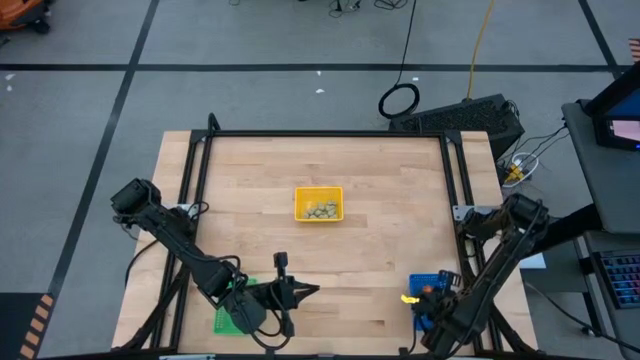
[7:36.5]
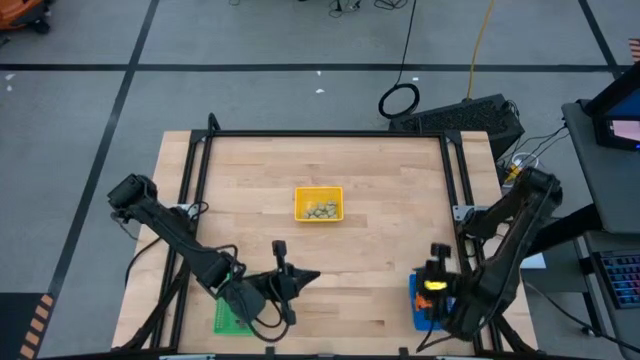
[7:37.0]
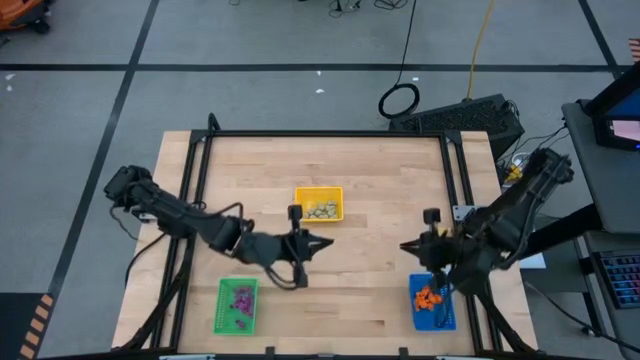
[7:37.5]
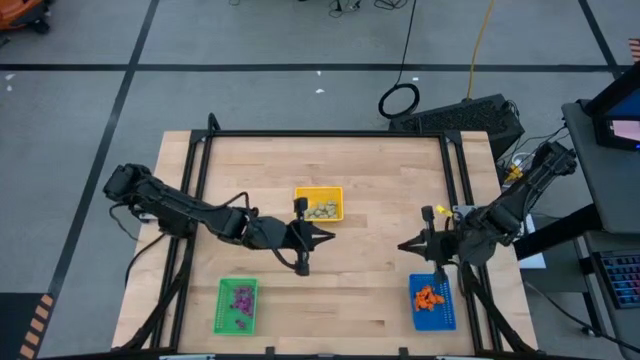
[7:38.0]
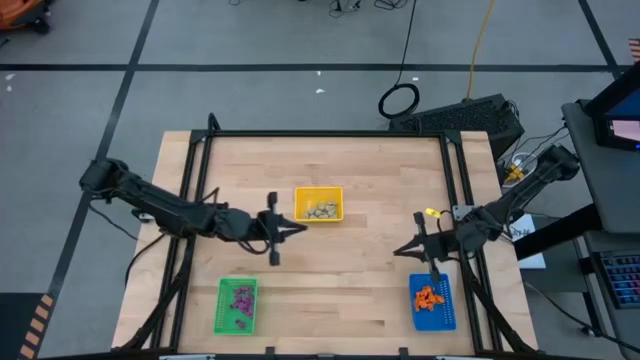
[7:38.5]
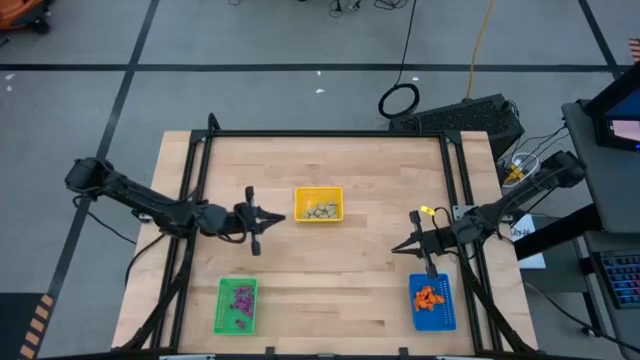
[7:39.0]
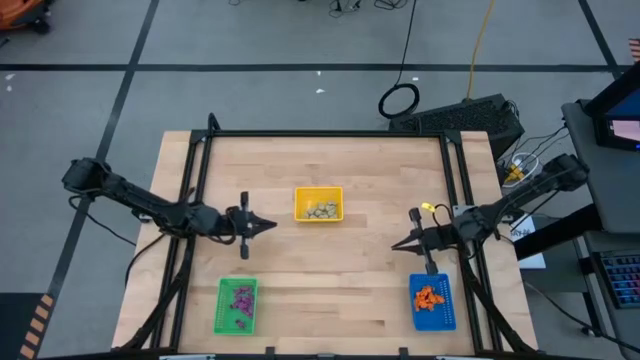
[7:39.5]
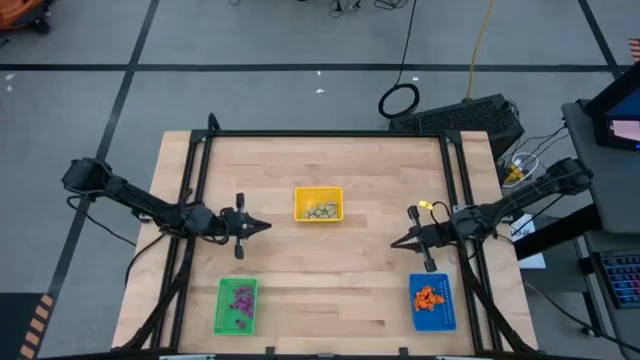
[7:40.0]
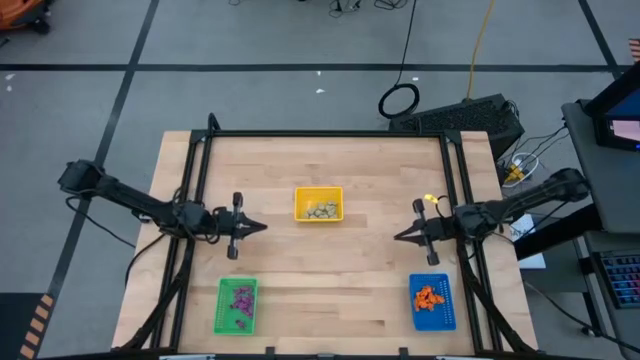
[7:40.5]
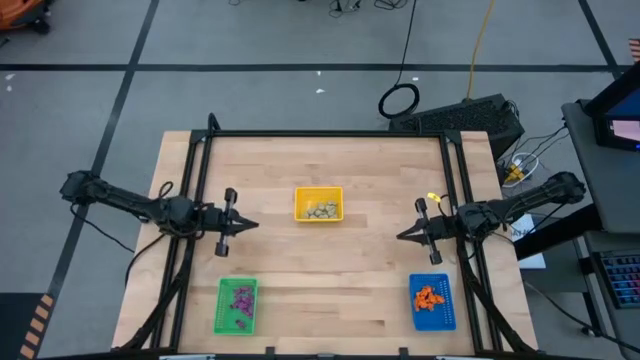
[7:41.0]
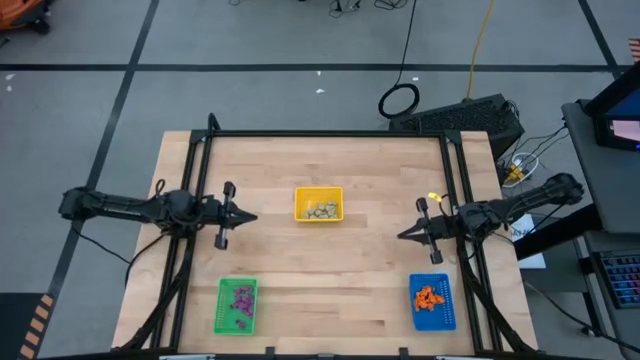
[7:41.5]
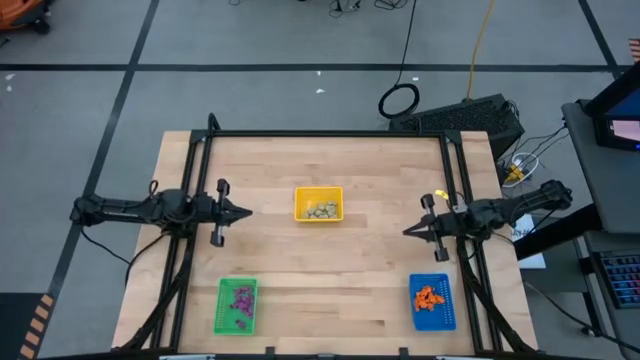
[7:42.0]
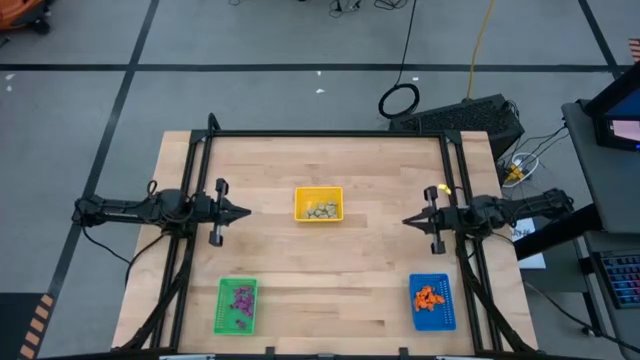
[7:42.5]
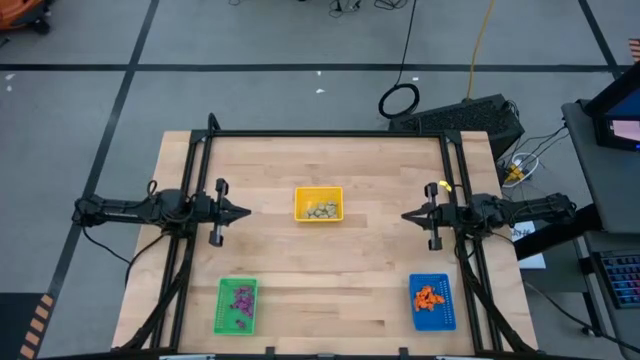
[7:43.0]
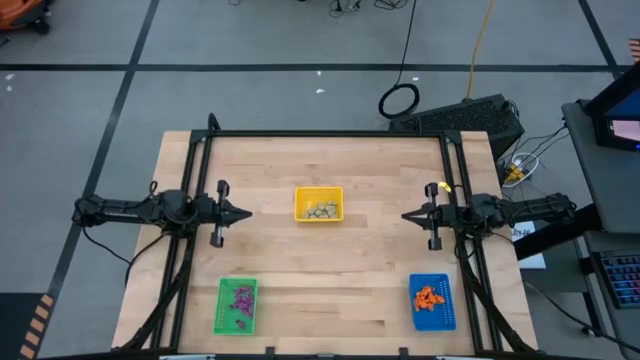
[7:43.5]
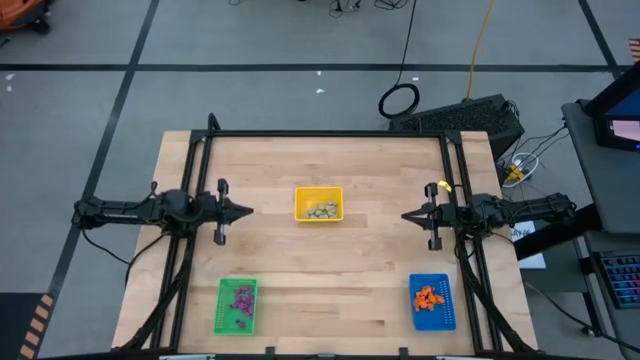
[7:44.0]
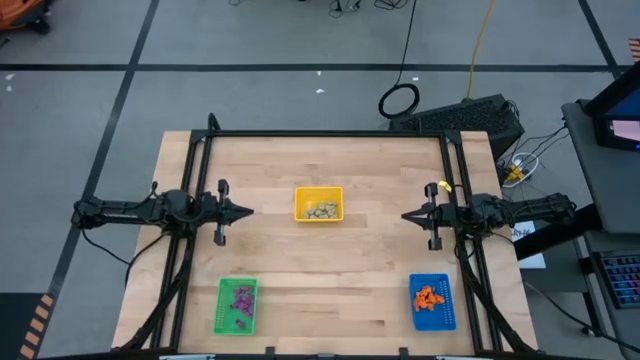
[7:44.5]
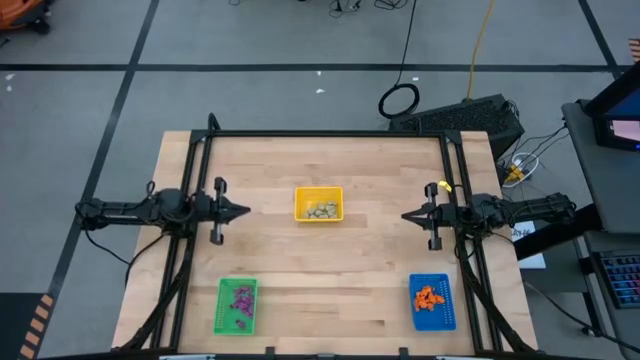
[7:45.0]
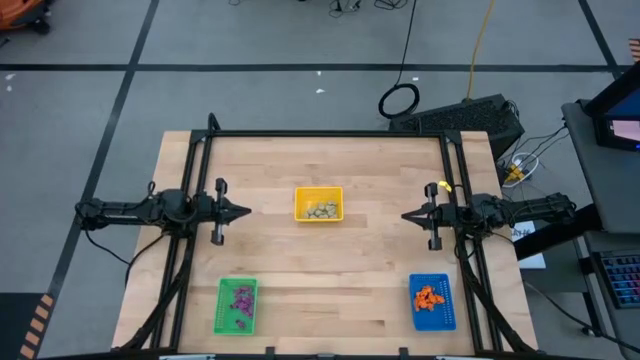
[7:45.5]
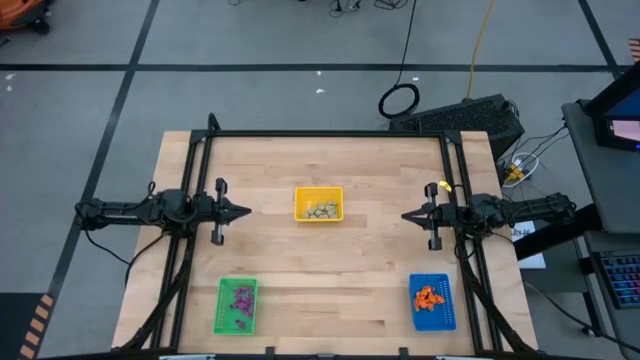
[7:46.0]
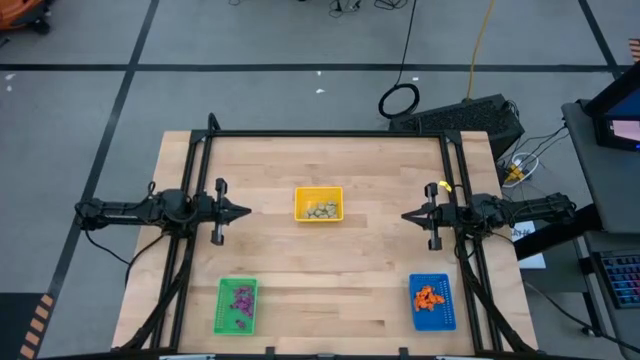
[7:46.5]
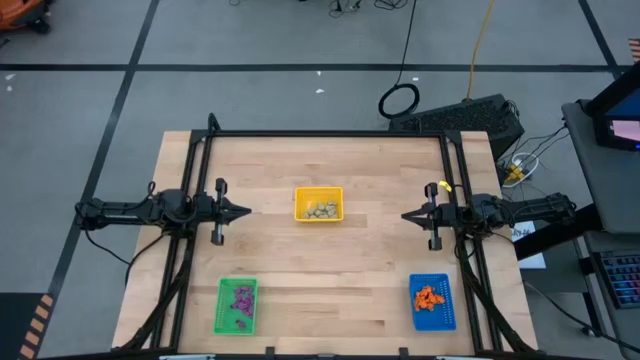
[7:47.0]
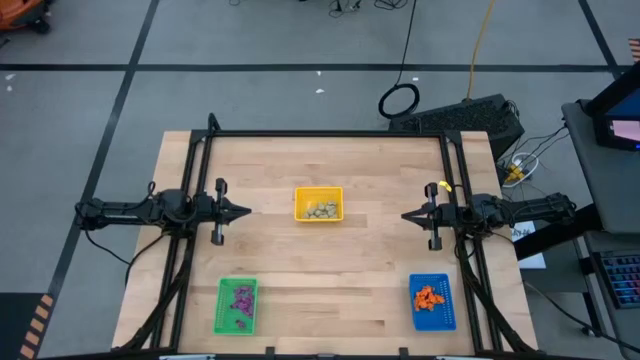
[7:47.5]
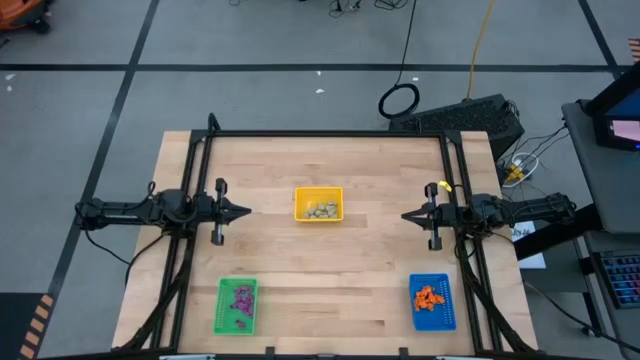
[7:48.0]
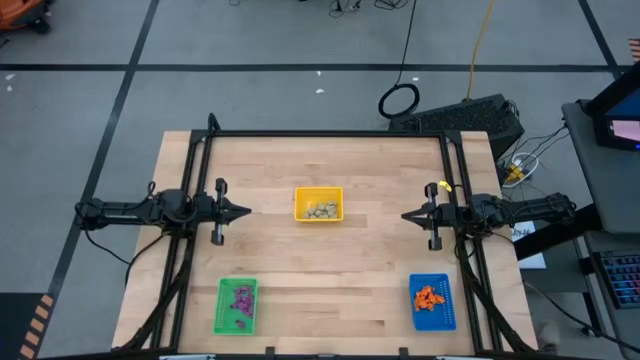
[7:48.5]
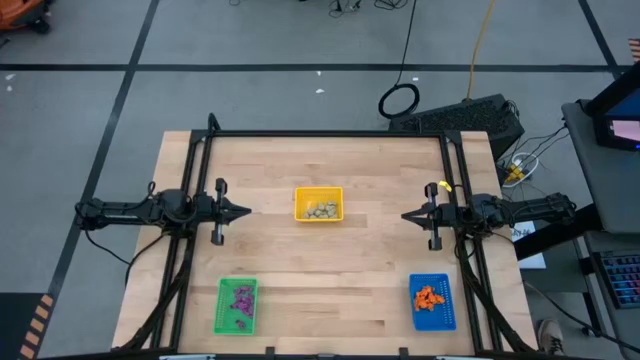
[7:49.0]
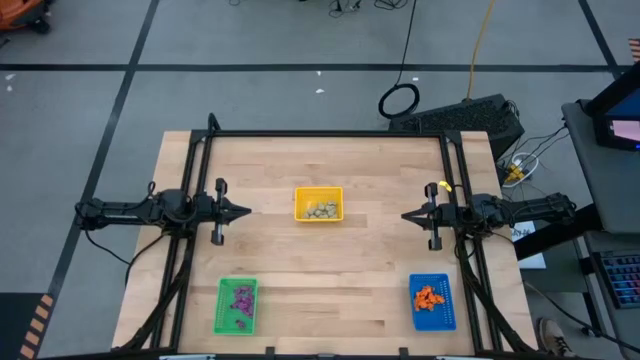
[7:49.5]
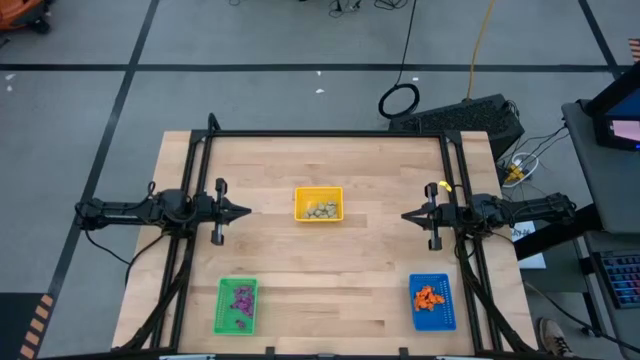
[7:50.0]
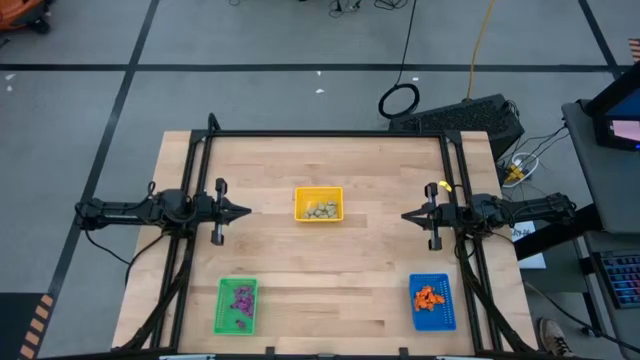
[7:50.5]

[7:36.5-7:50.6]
Task: Sort Halloween decoration
Return to Home Position
